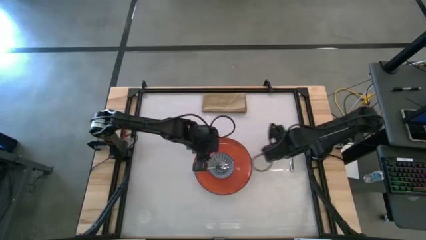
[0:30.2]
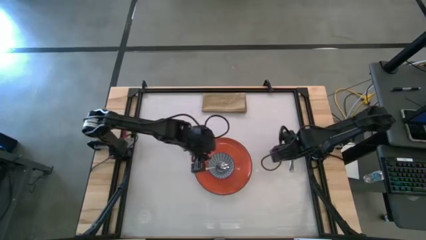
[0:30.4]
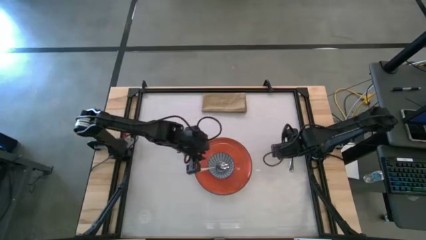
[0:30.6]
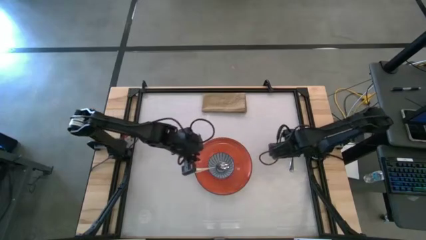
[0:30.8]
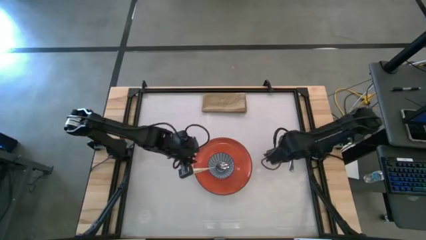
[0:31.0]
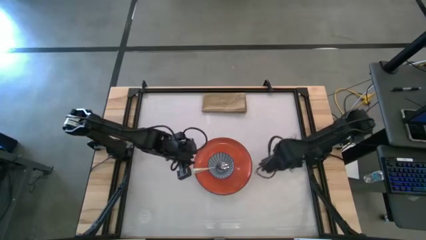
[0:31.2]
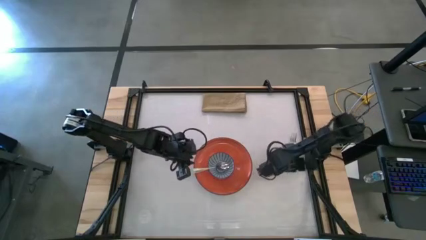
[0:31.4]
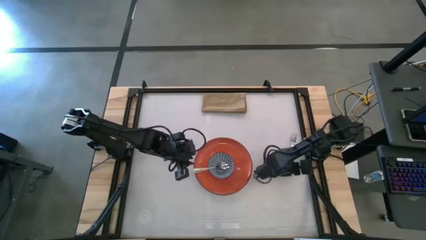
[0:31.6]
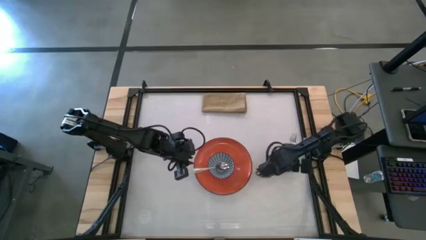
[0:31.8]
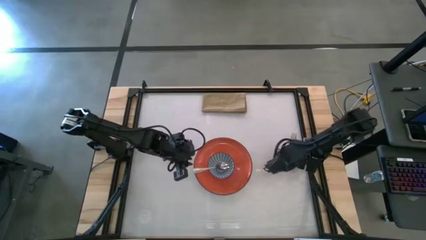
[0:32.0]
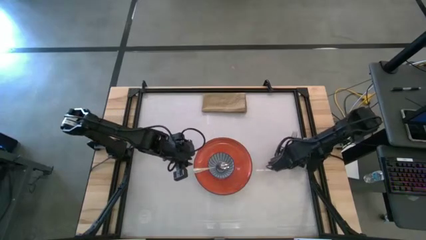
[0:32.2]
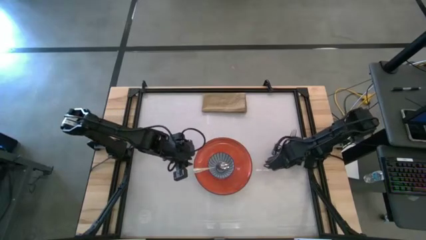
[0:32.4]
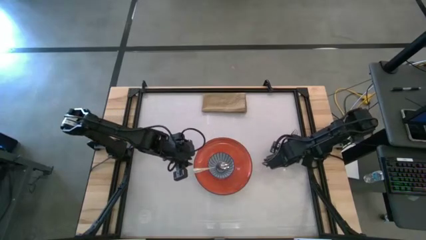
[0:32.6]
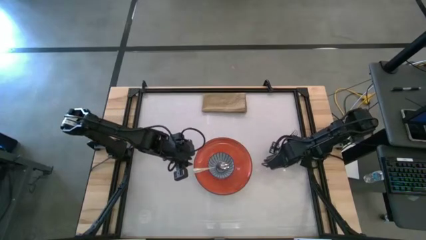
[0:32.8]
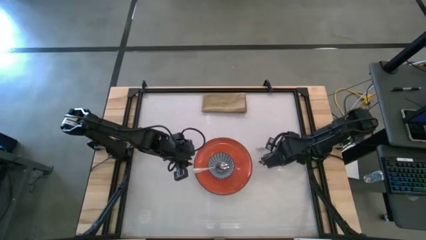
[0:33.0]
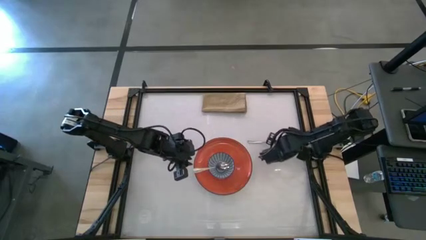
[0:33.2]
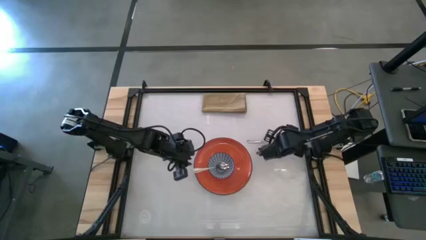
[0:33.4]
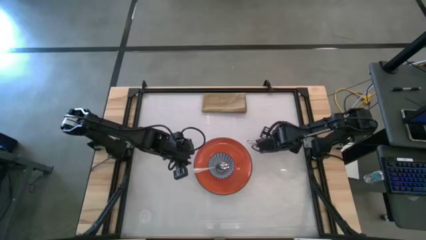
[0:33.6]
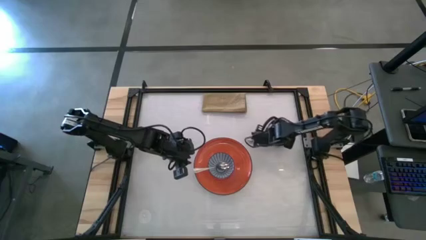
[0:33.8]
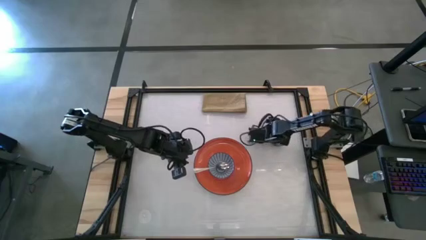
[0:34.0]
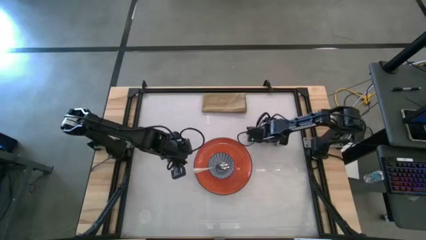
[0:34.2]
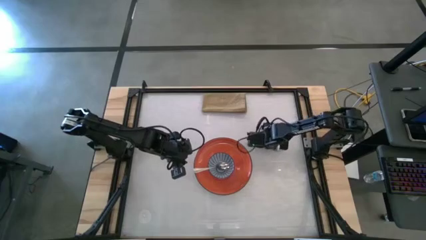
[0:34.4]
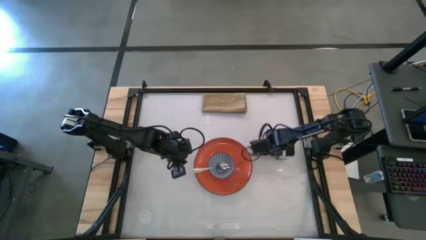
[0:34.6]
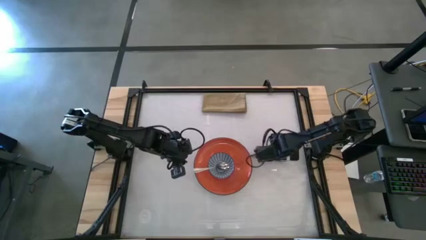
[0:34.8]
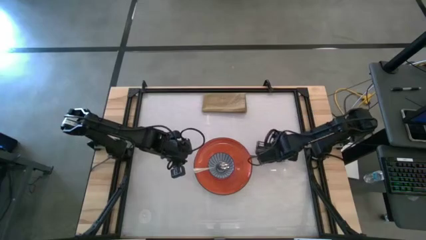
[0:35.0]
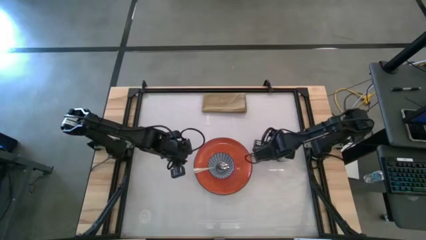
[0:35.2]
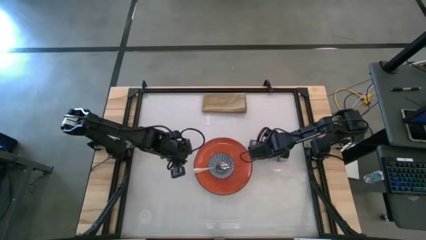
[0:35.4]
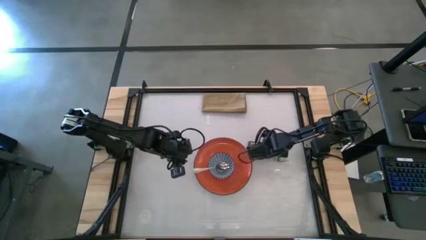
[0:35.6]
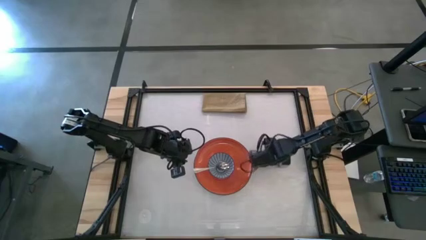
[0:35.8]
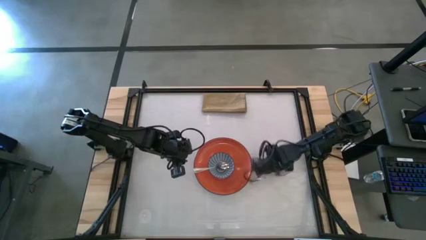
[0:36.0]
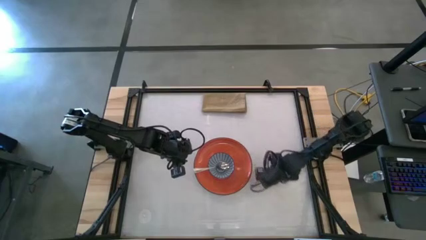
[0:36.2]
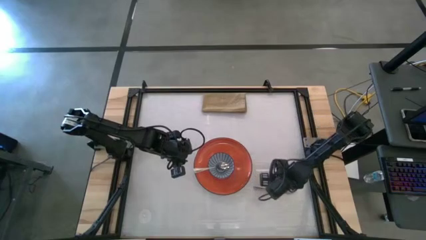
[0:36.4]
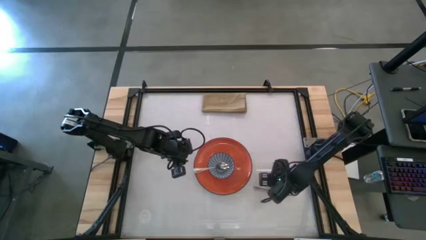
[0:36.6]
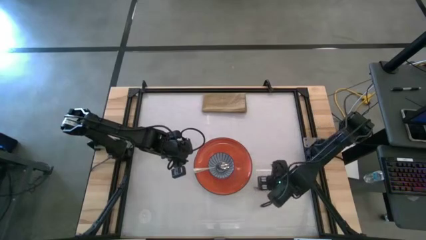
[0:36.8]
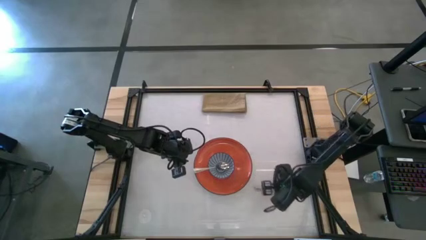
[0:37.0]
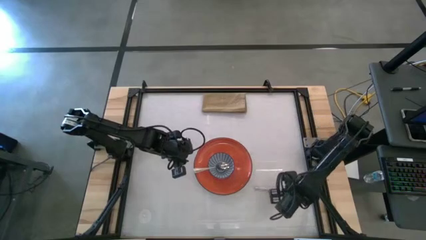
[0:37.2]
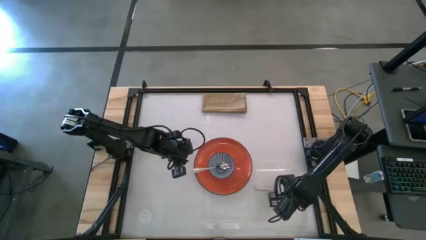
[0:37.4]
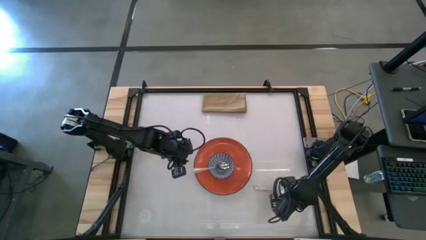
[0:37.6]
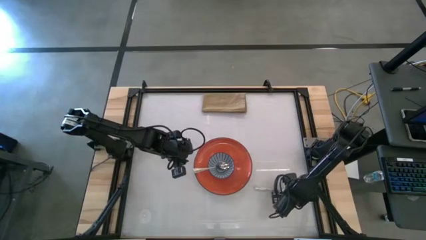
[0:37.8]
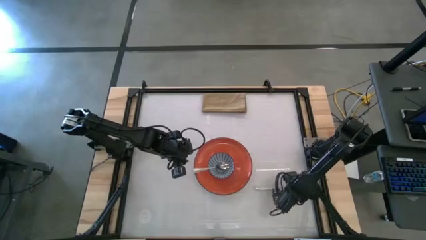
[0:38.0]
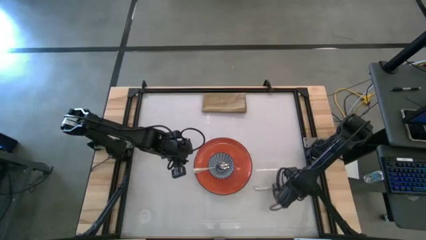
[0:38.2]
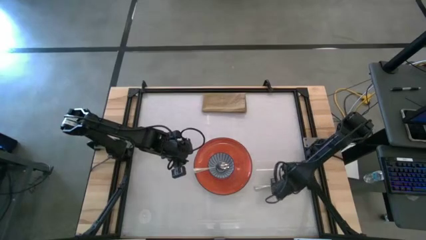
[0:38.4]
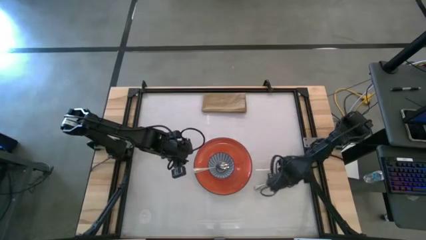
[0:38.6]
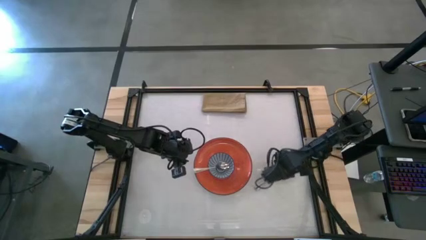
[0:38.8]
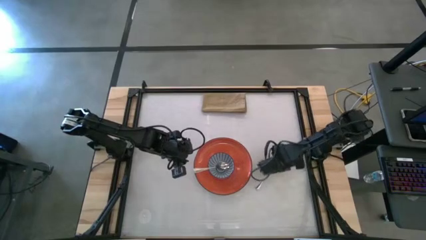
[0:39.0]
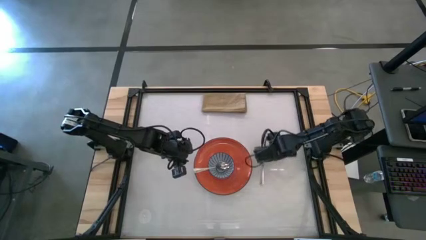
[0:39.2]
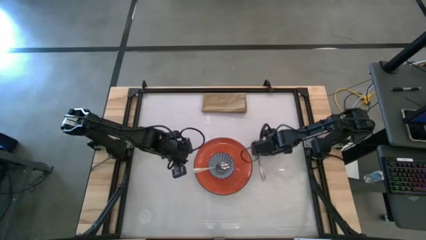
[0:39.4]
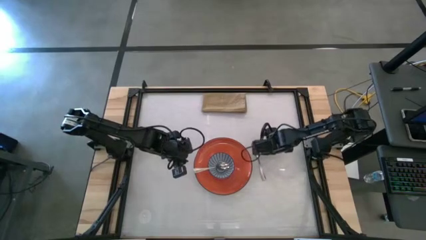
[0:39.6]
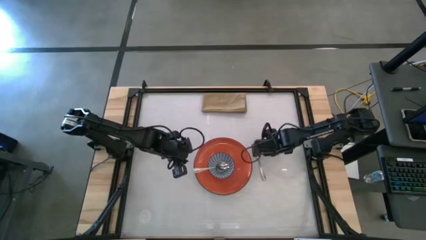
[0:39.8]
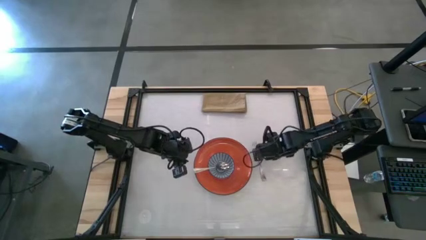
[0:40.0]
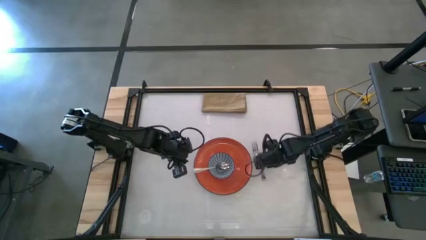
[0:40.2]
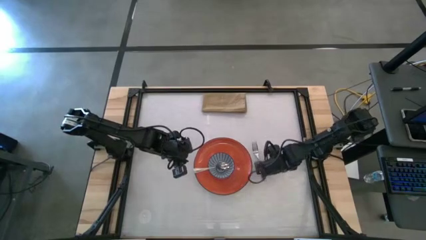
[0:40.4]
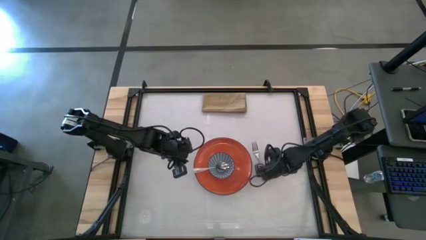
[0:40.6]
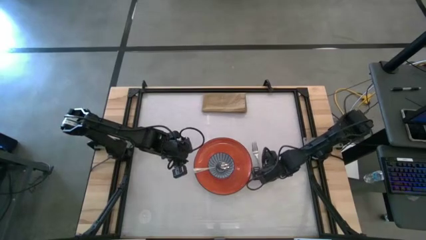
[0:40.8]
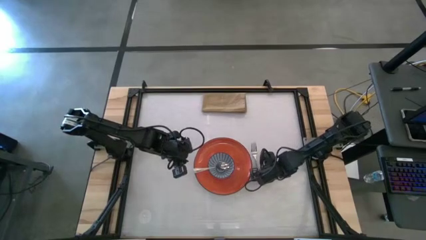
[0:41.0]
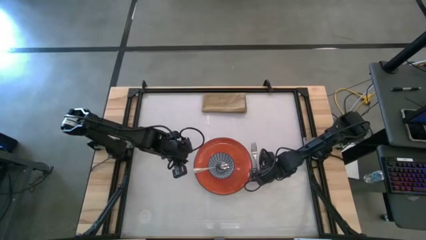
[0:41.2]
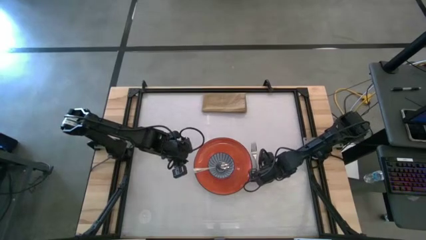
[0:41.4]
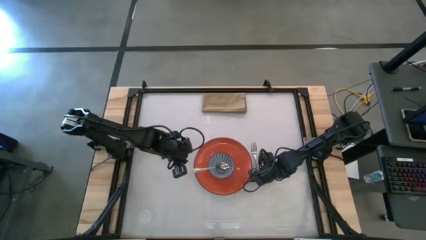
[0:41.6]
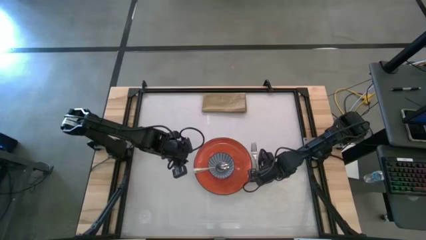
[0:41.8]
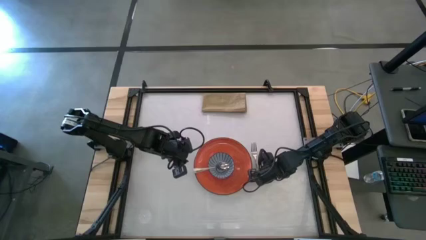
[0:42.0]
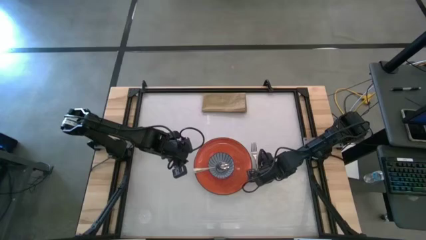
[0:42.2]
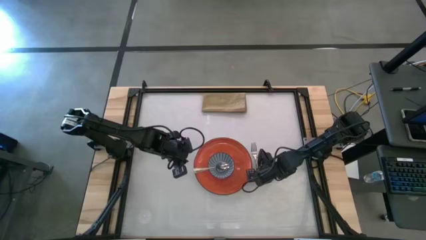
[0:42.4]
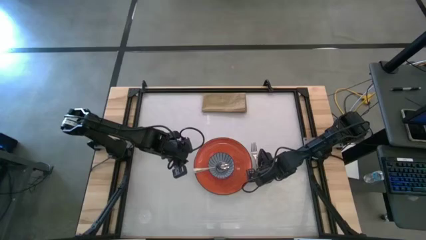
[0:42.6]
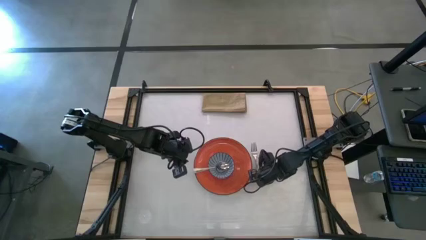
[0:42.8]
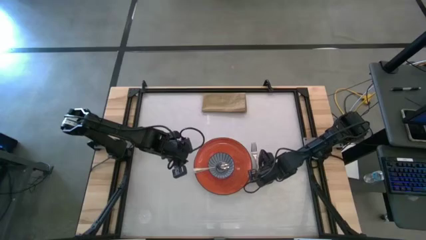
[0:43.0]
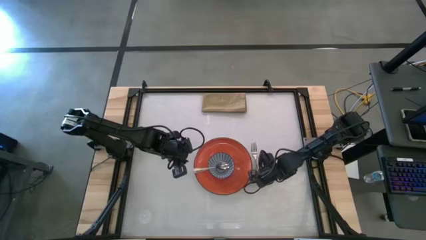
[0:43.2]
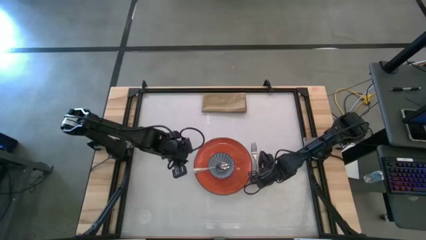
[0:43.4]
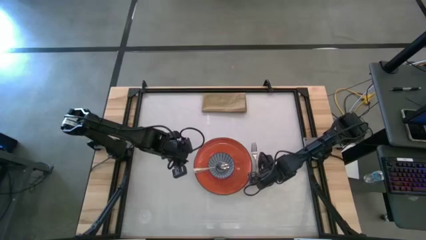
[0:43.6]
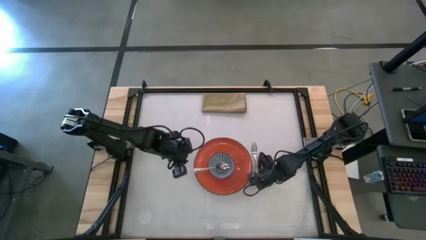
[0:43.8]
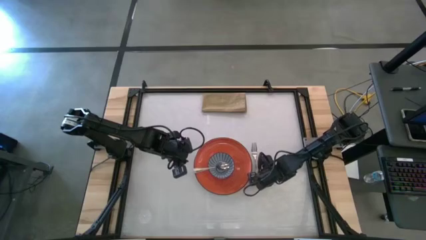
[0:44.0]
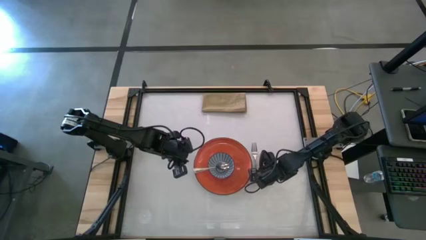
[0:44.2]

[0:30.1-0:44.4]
Task: Set table place
Move the fork from the middle right to the right side of the orange plate

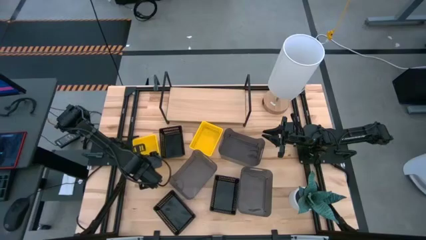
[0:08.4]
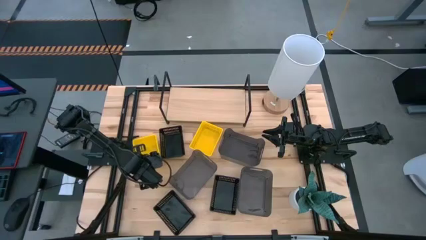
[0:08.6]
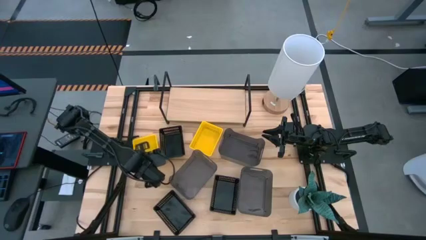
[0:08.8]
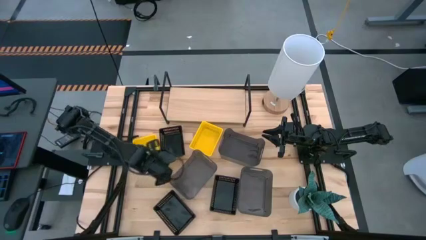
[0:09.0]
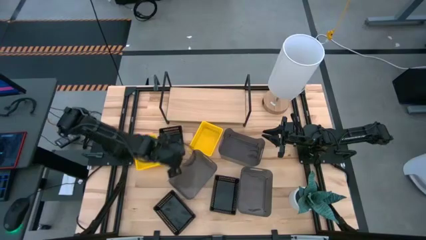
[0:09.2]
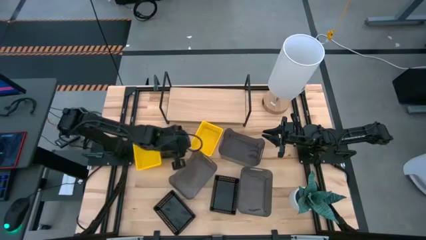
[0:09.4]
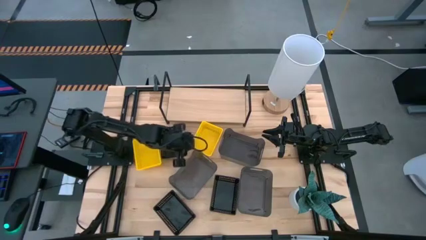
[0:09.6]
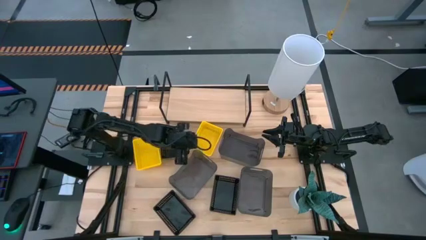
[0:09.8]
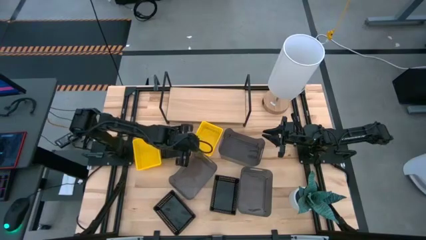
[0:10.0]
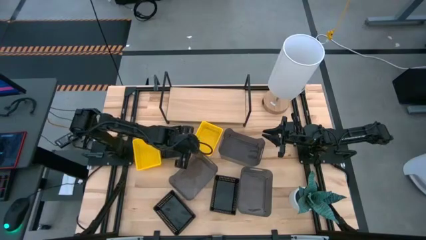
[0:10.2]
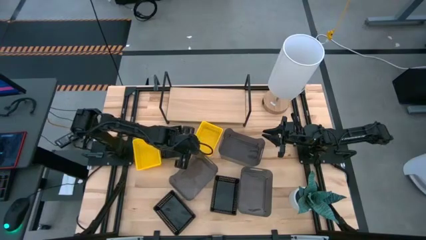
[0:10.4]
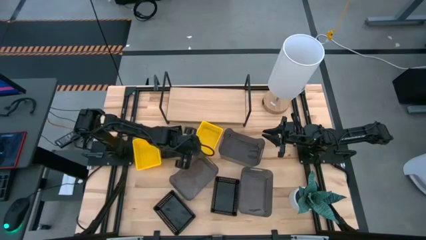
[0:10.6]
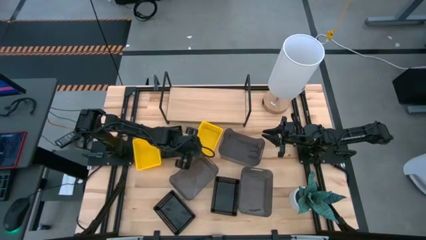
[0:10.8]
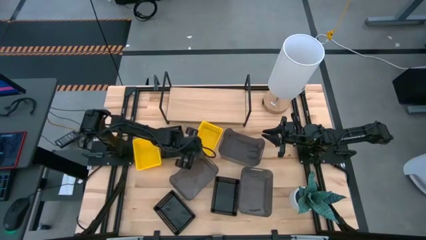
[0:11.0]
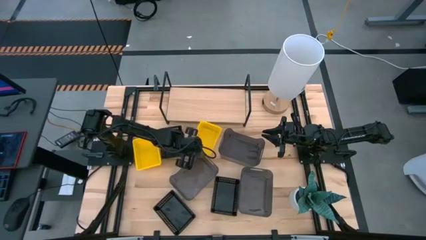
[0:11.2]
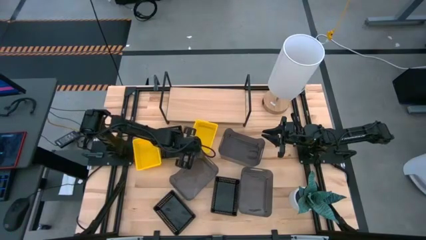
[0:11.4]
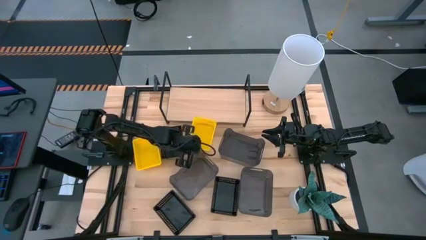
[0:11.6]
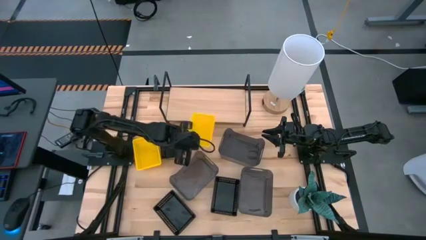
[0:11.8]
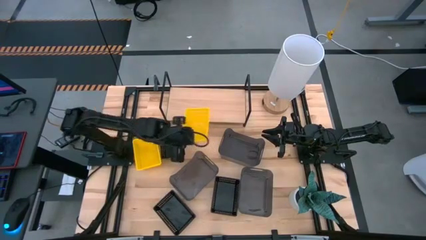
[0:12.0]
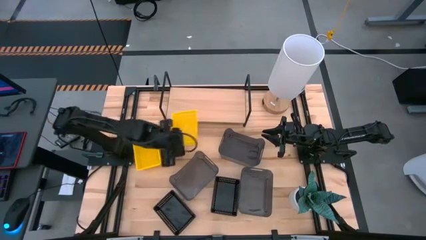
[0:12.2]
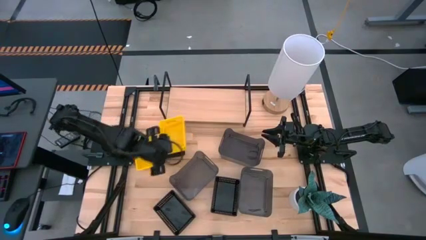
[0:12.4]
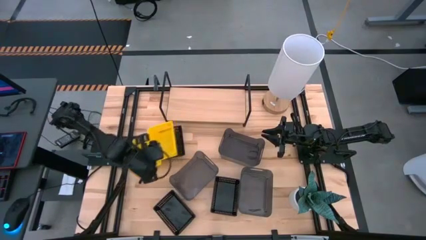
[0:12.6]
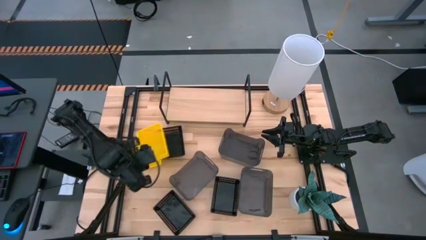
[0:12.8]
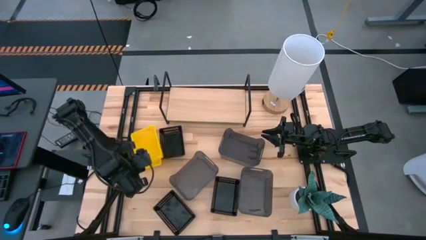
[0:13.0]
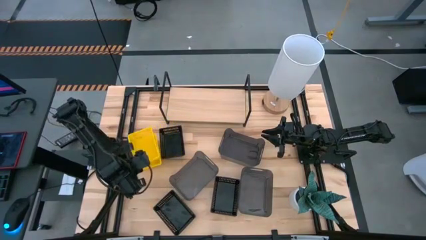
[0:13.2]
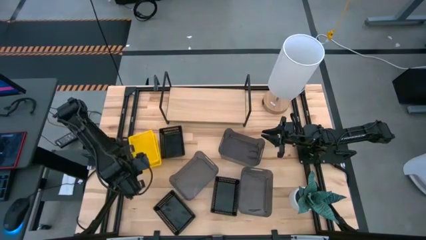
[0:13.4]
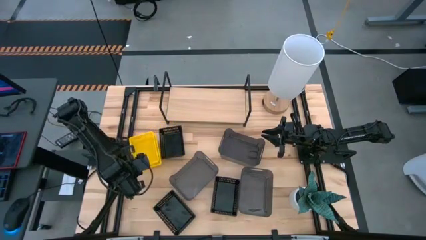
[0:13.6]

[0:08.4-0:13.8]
Task: Stack baskets on shelf by color
Stack the right yellow bin on the yellow bins
